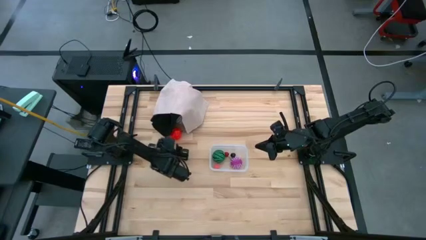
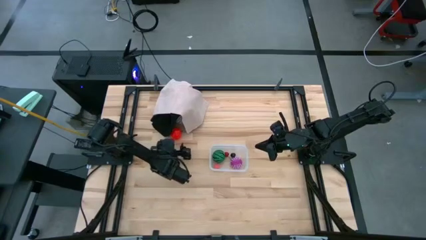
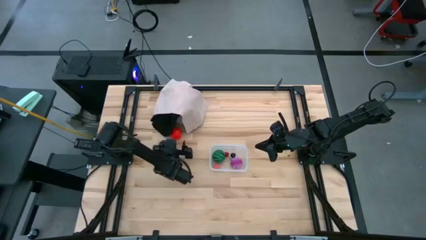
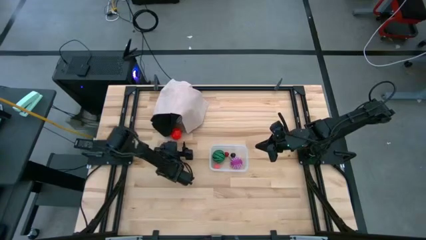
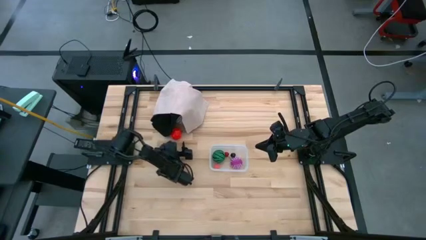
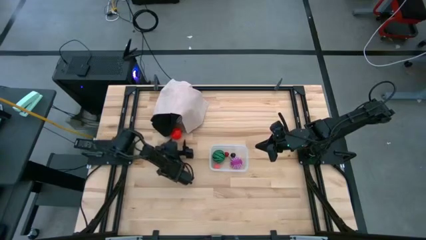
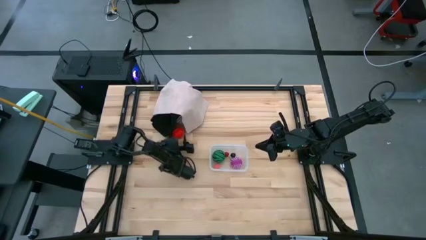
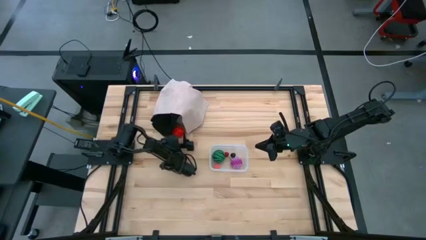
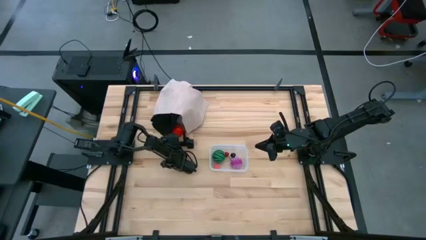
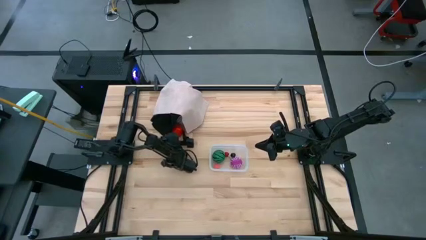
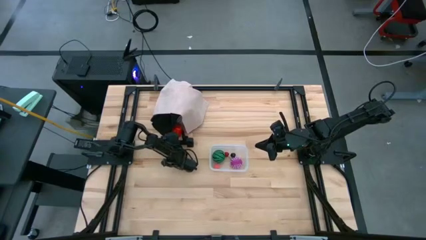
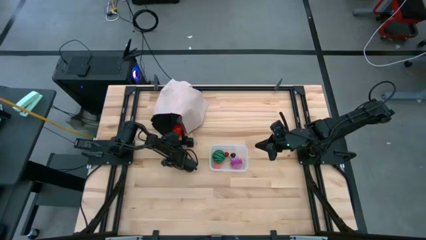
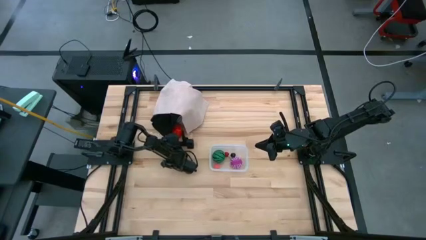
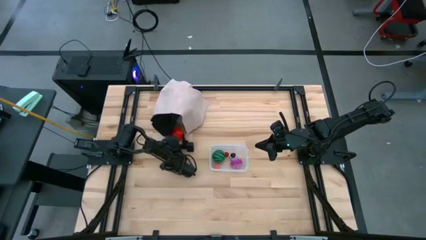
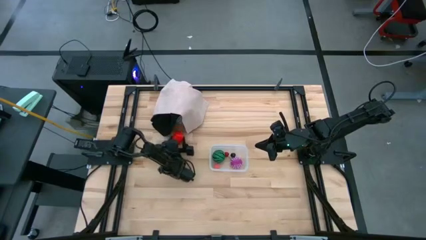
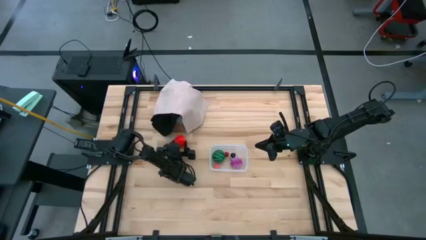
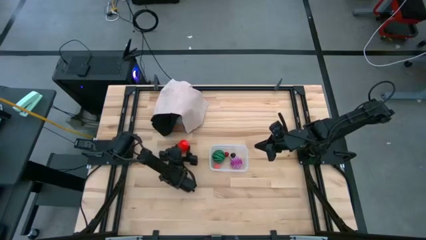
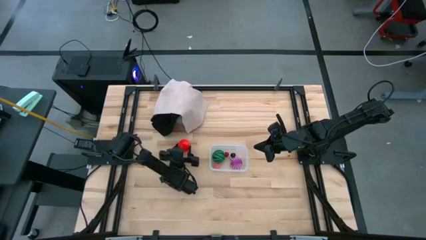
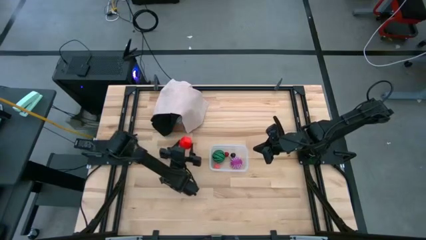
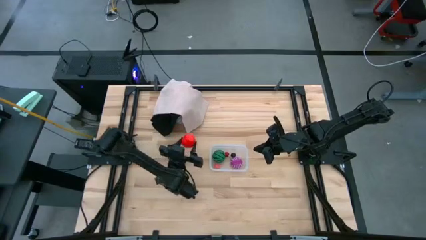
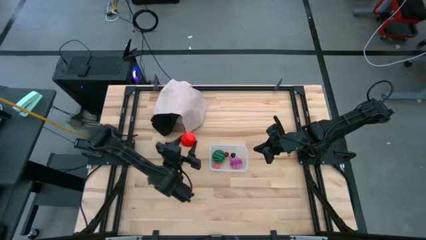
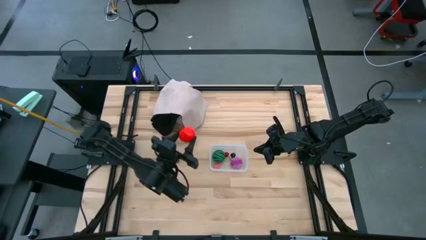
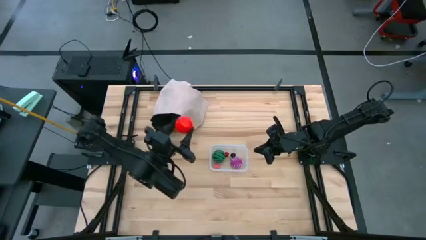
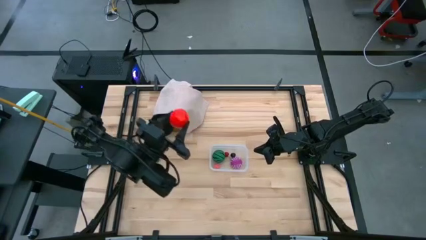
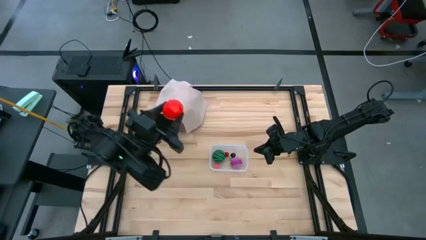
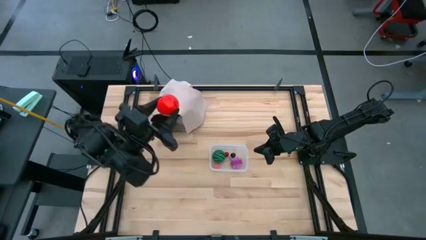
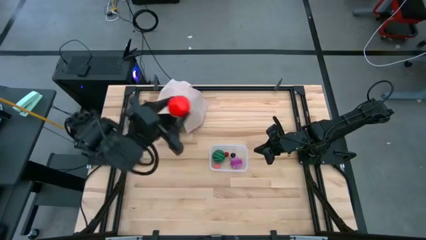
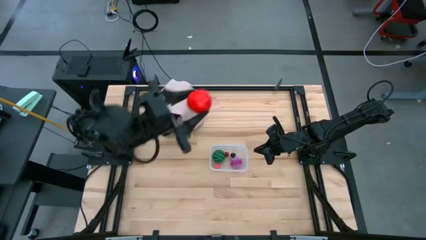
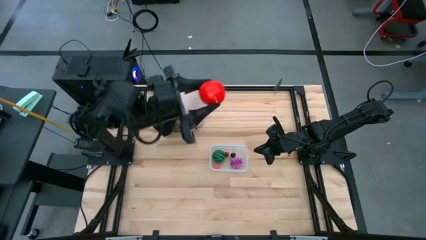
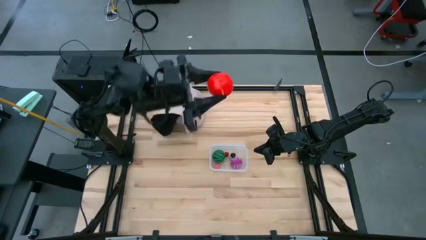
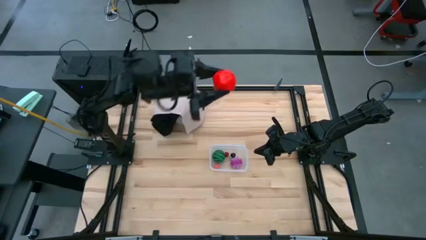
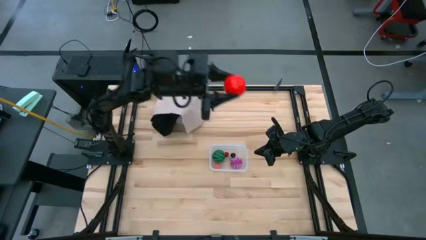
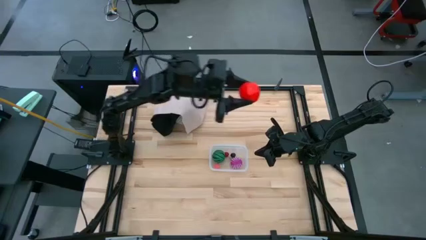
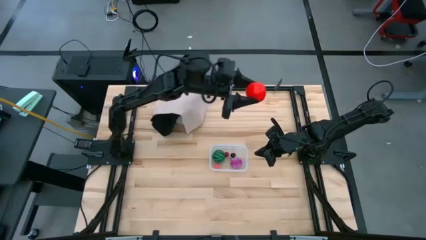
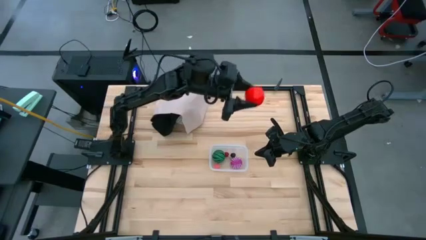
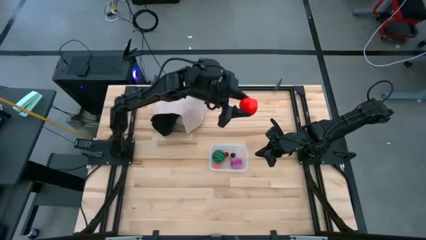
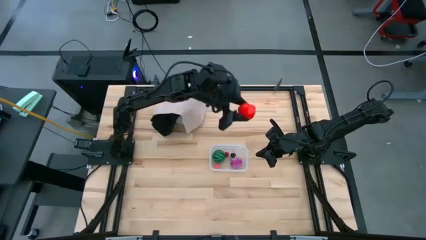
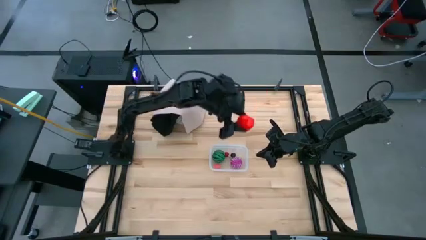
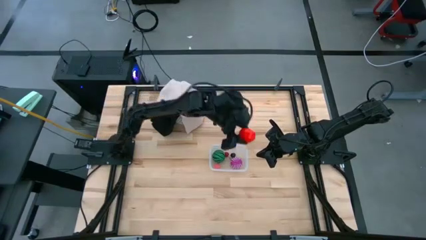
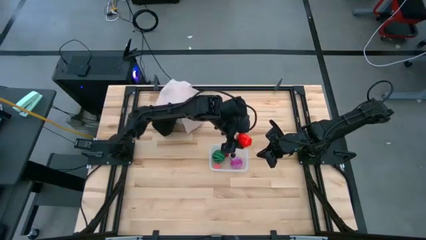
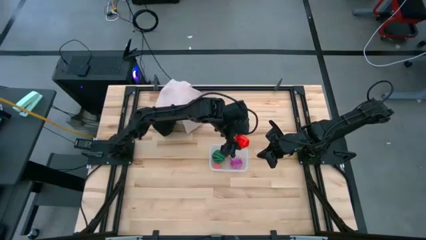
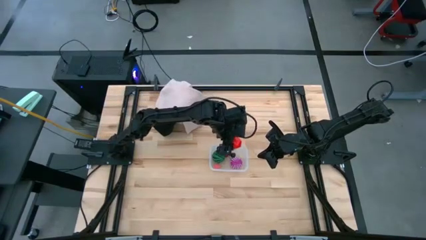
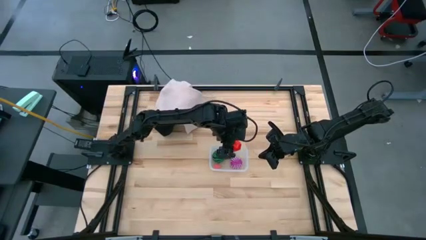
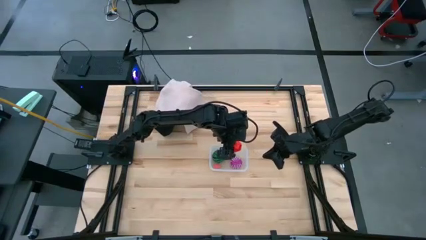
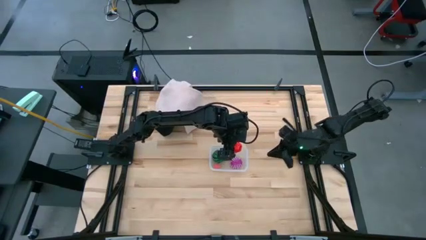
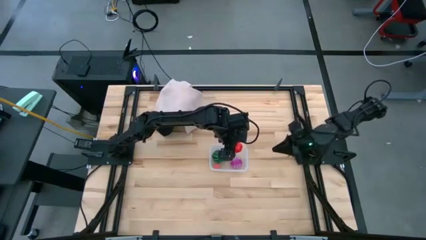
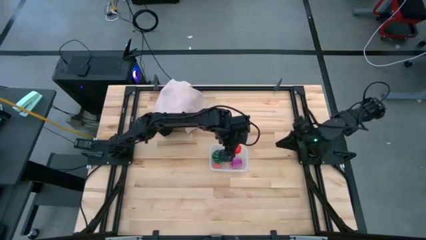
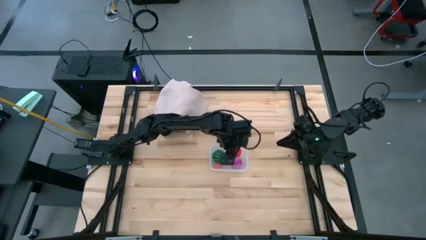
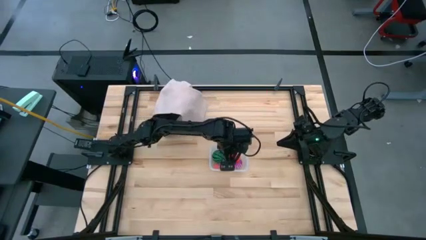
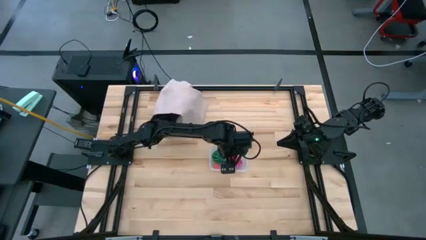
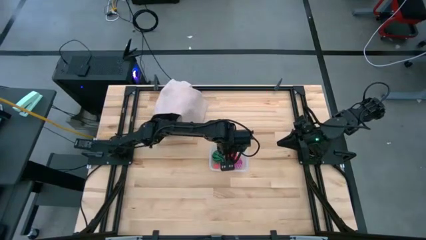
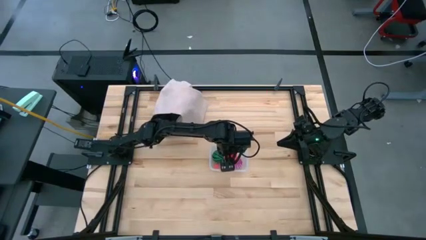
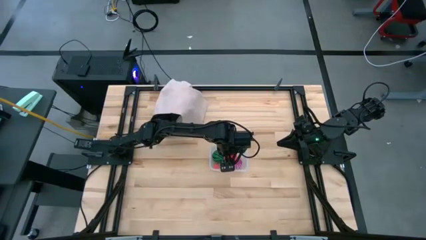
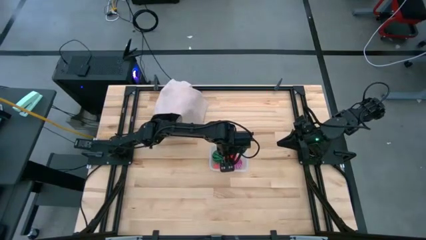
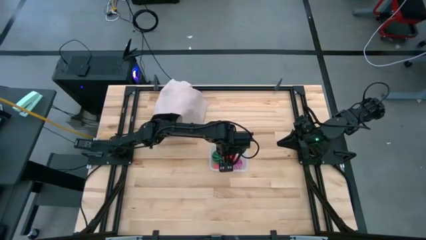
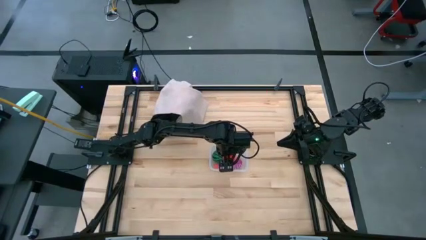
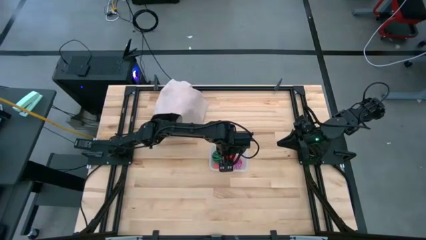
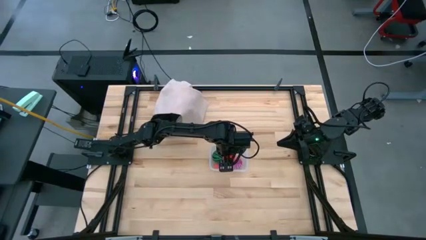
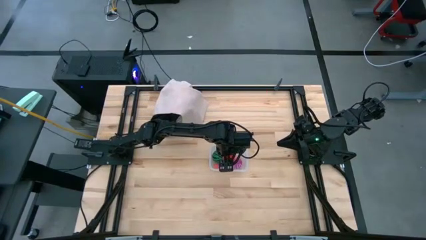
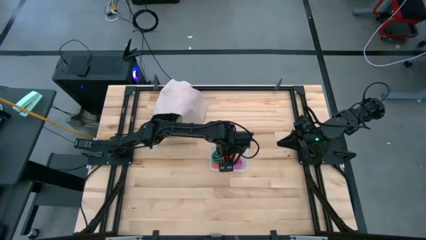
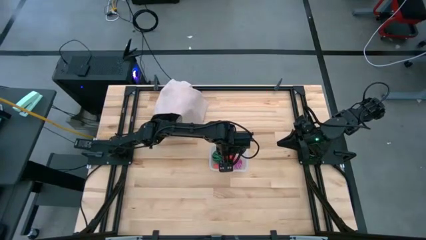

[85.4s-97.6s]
Task: Pick and placing Produce into tupperware
Put the apple into the transparent bin
